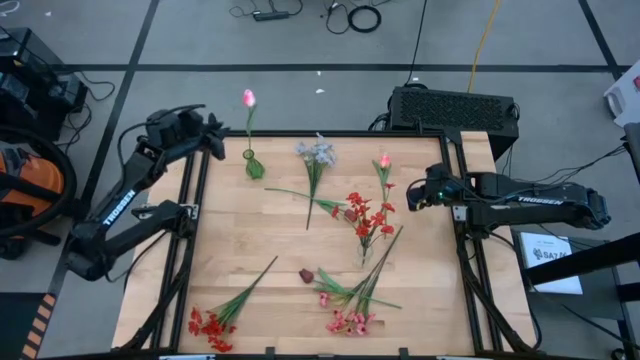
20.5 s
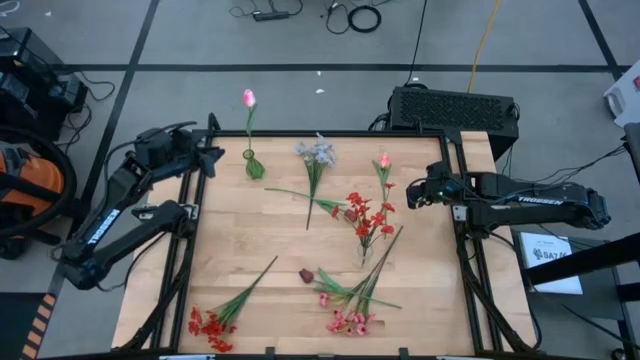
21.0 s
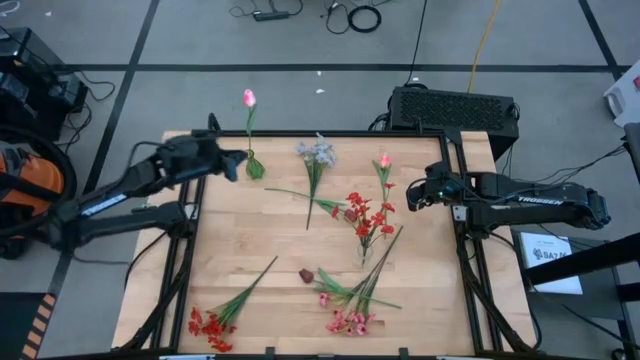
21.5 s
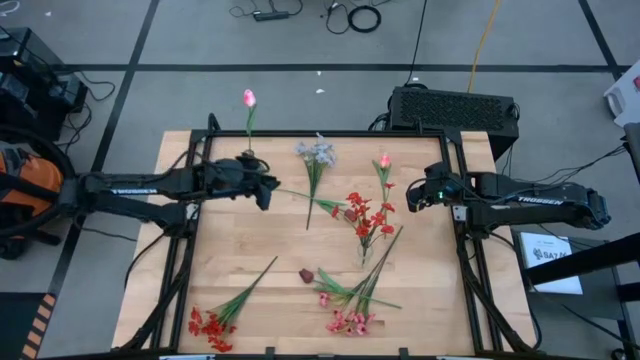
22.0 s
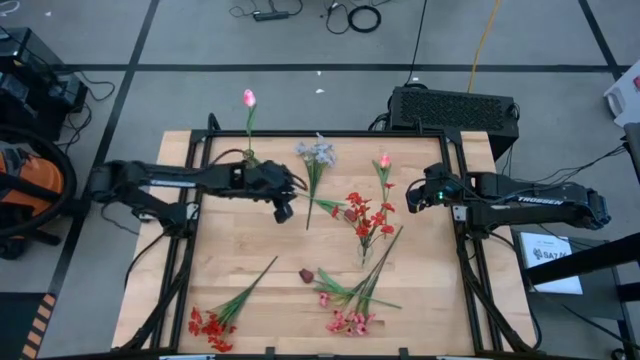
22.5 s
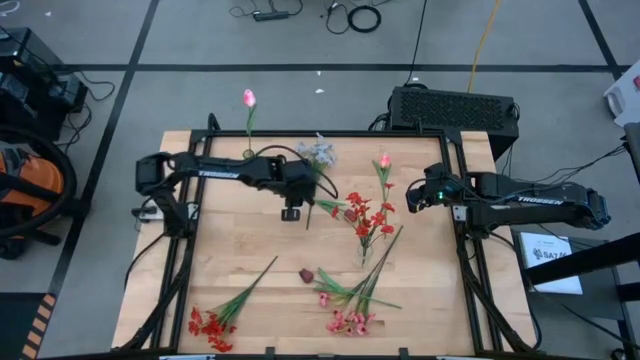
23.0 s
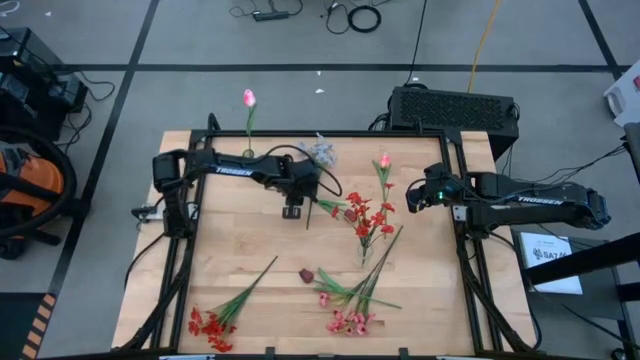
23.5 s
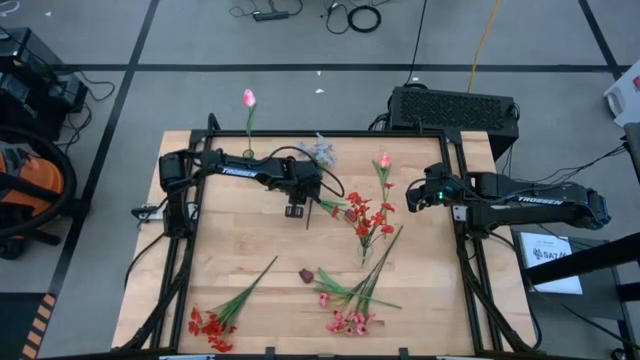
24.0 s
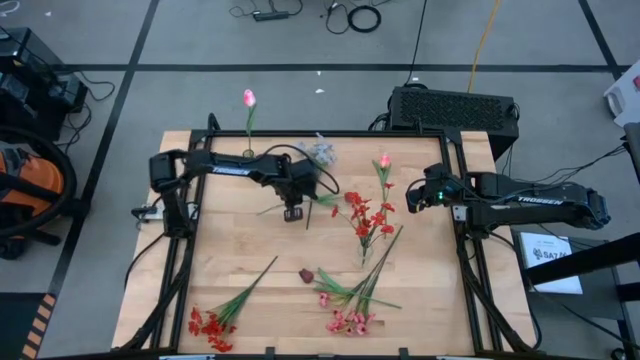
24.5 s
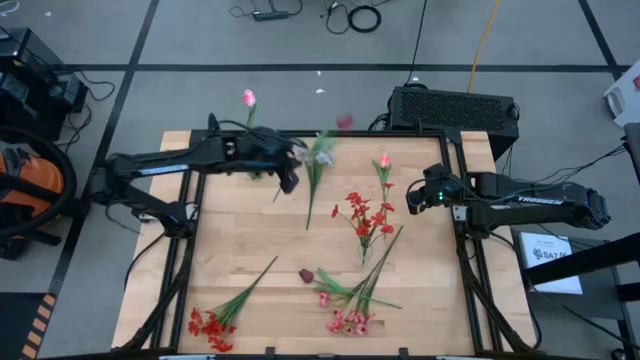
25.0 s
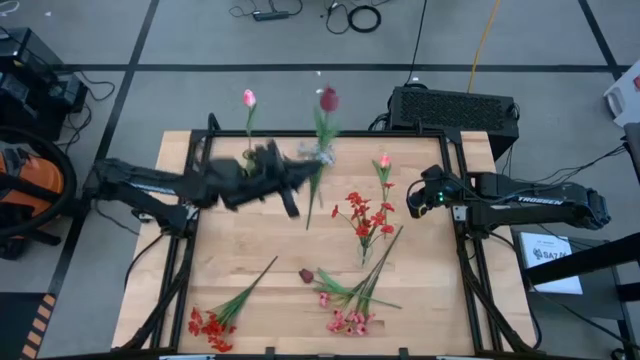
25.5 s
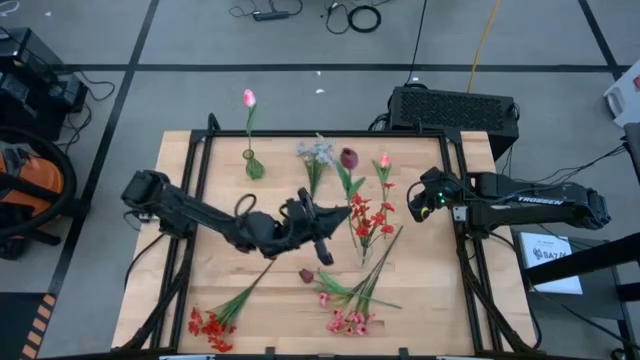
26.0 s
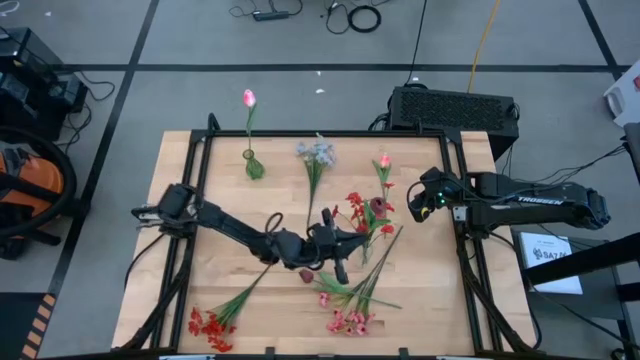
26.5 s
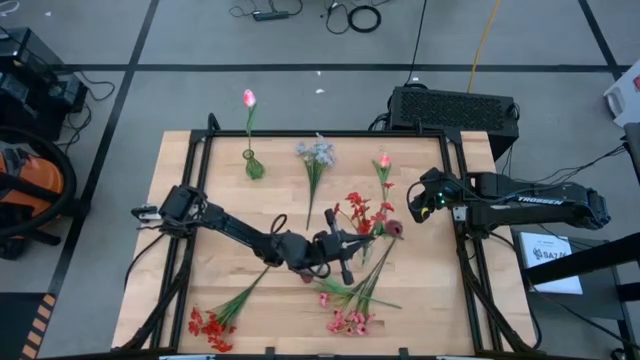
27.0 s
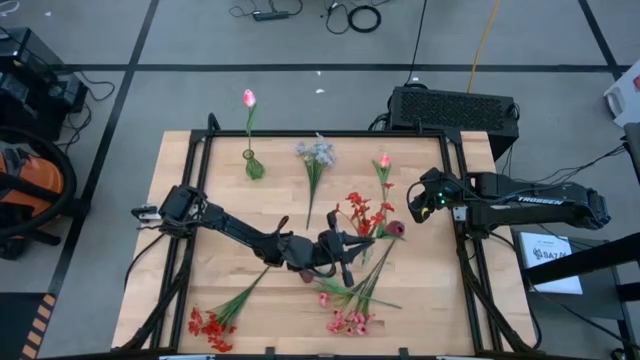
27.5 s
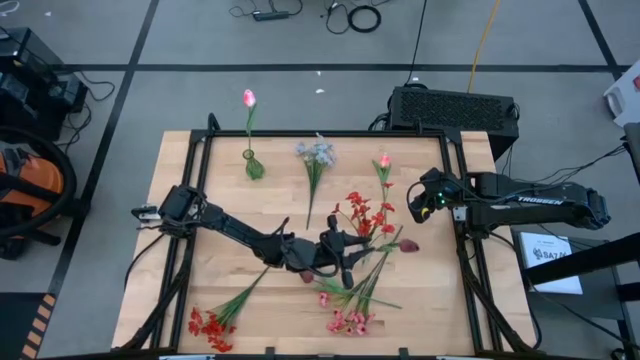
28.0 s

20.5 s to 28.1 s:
Task: Sort flowers into vase by color
Put the top red flower into the transparent vase

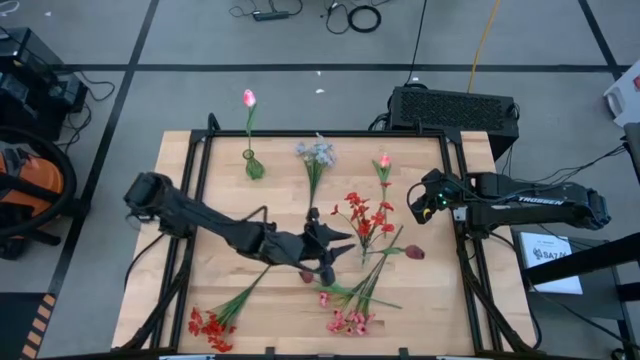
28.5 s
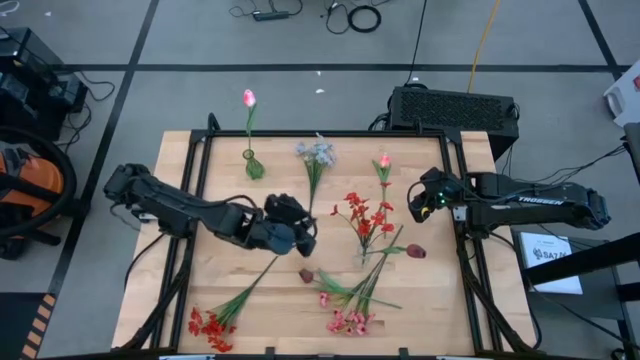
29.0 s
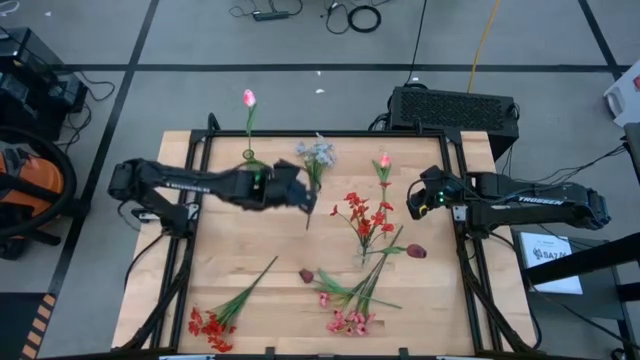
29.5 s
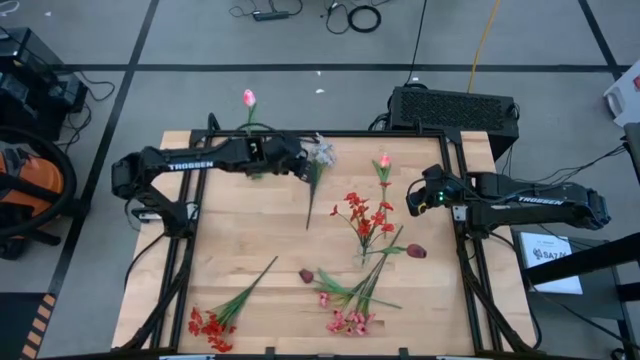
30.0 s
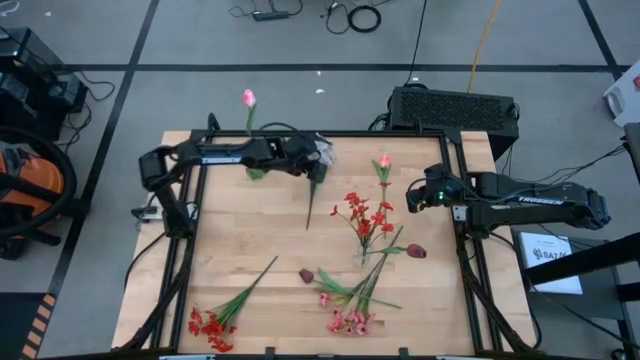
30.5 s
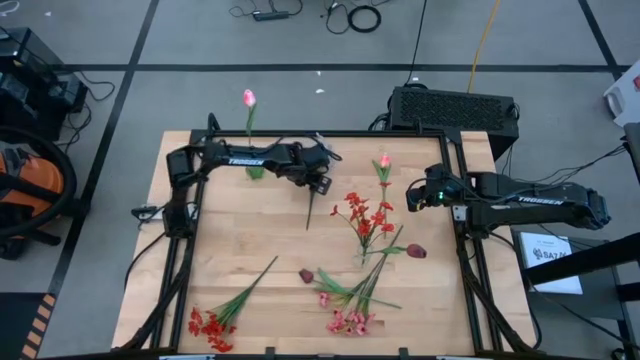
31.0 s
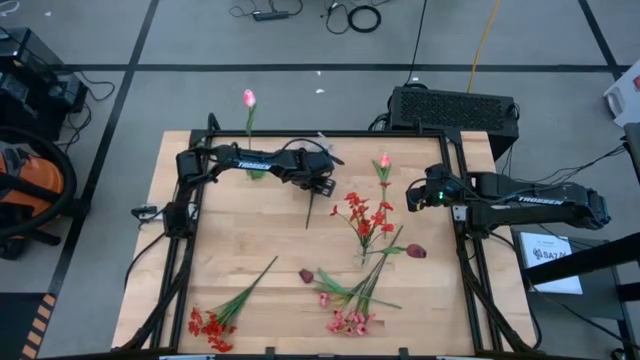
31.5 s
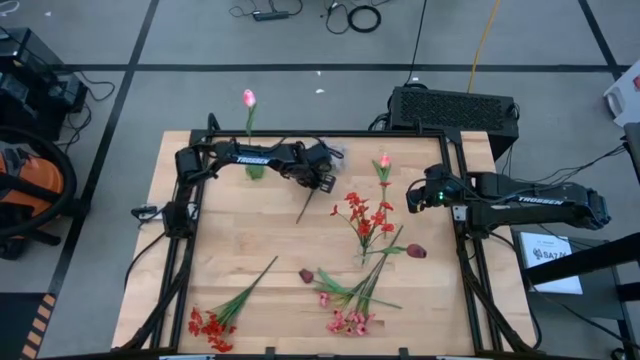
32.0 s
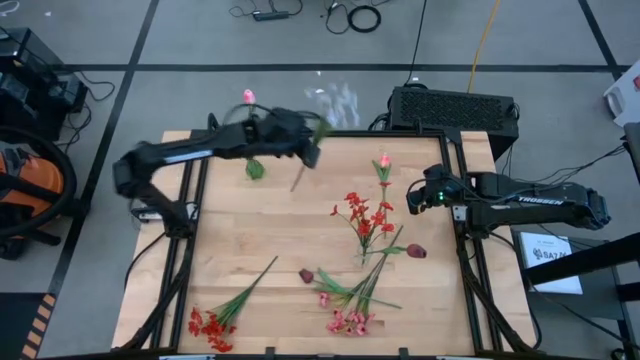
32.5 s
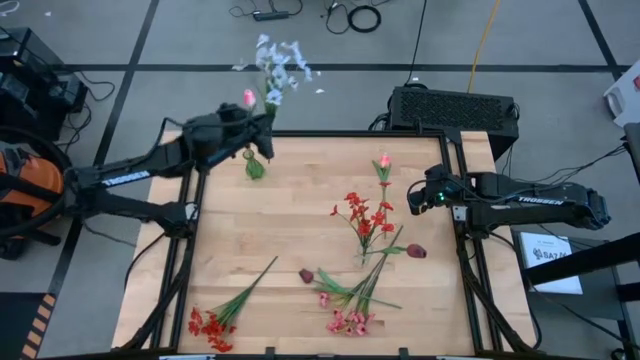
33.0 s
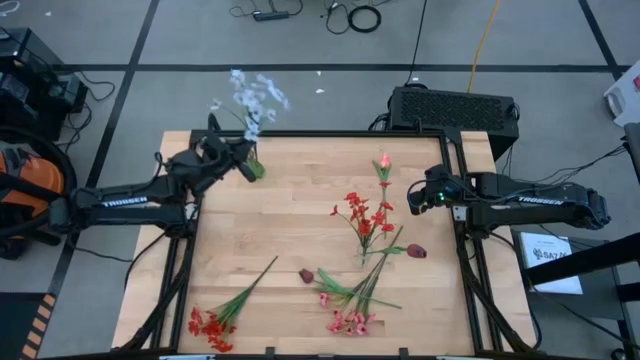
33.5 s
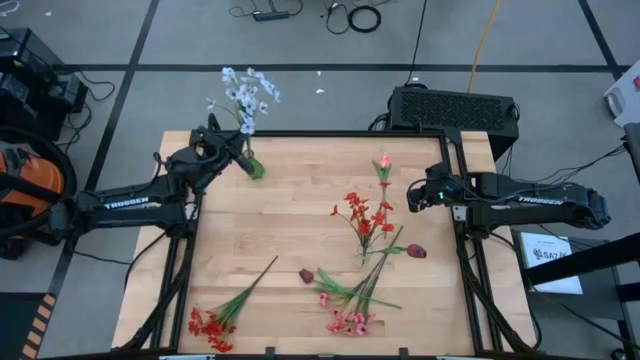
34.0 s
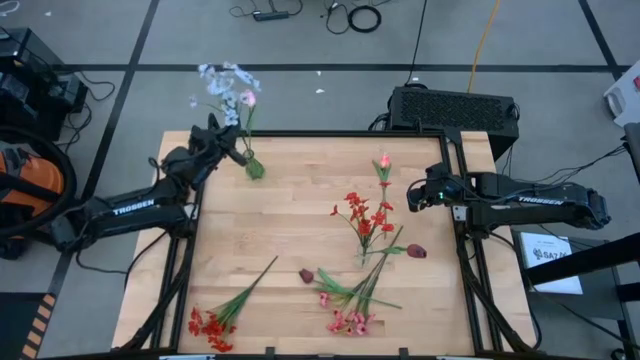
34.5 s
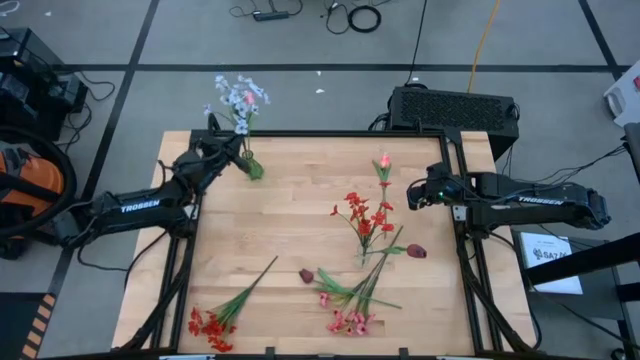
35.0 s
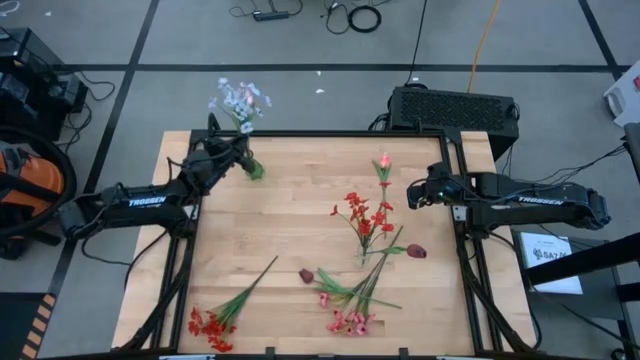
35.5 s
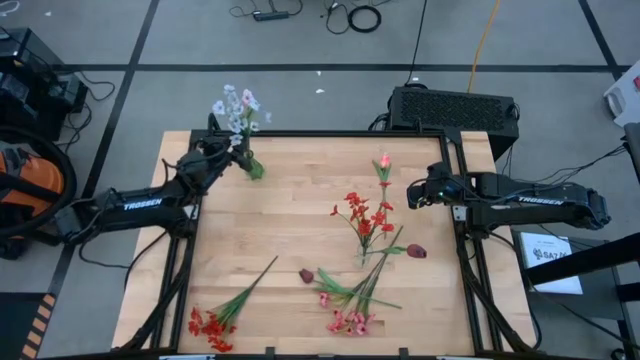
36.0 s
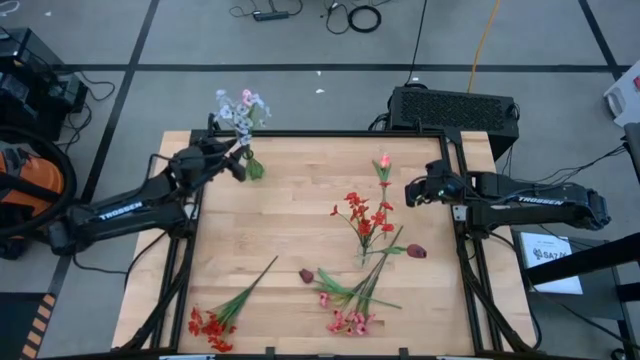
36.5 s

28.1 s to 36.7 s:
Put the white flower into the green vase

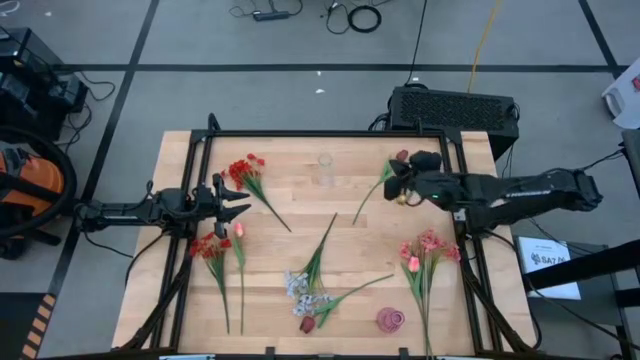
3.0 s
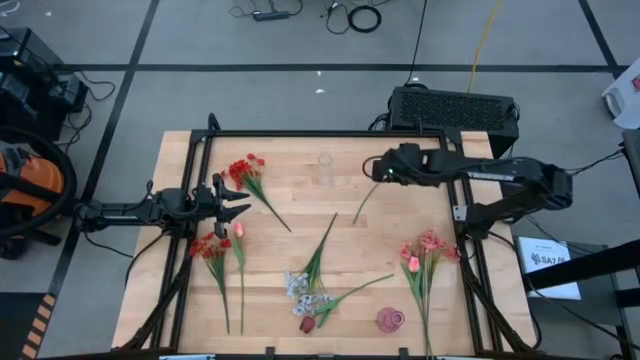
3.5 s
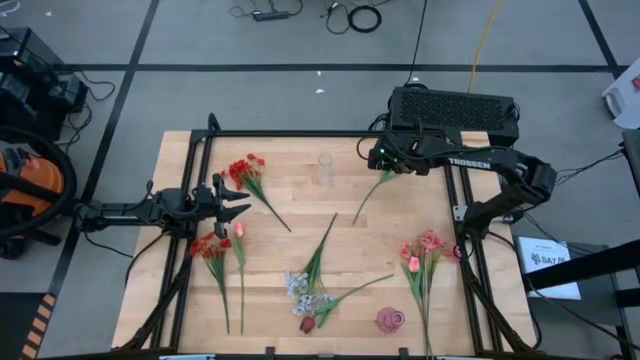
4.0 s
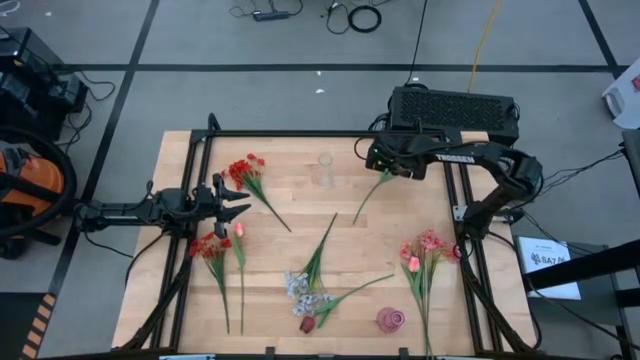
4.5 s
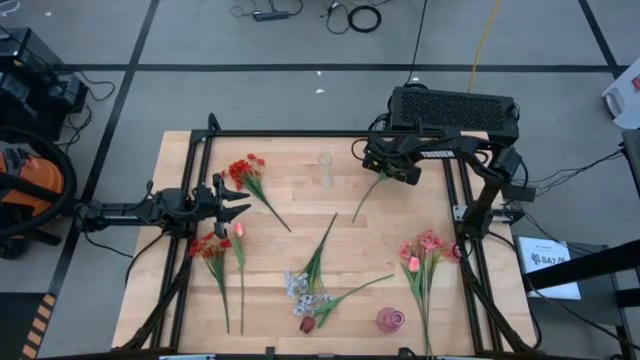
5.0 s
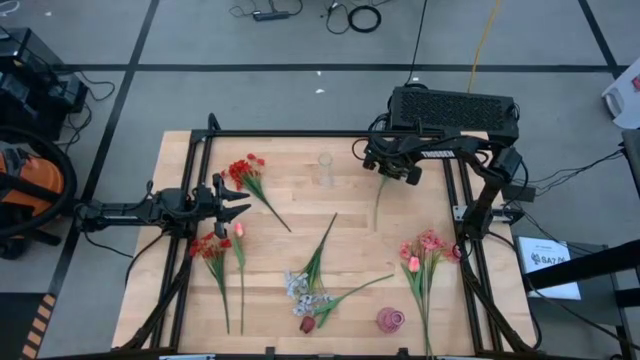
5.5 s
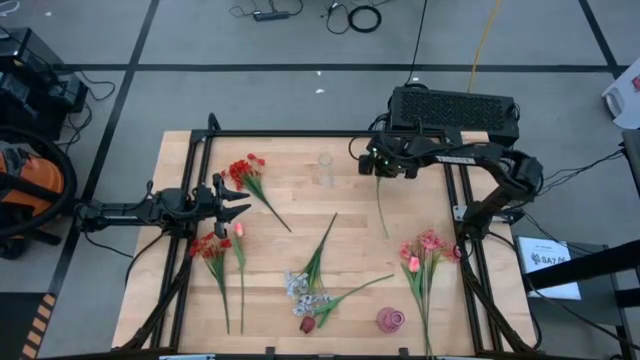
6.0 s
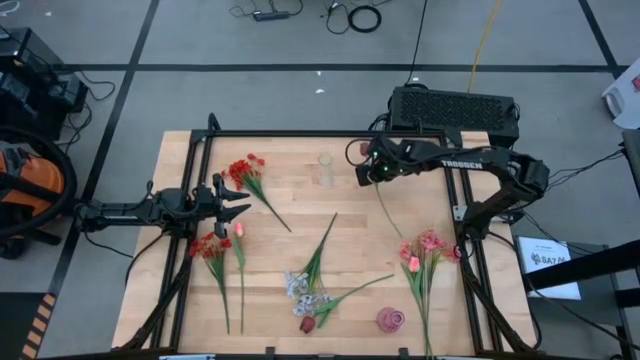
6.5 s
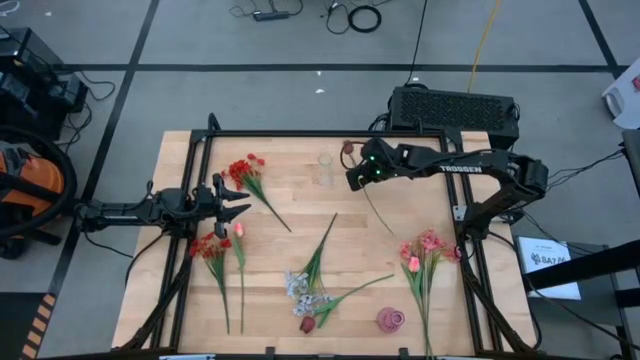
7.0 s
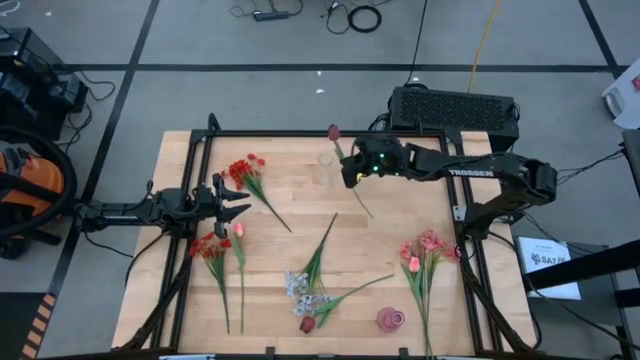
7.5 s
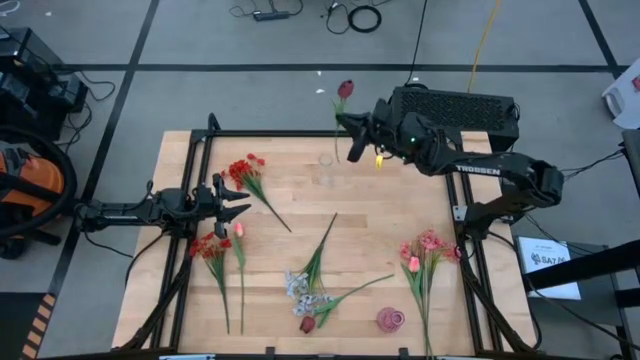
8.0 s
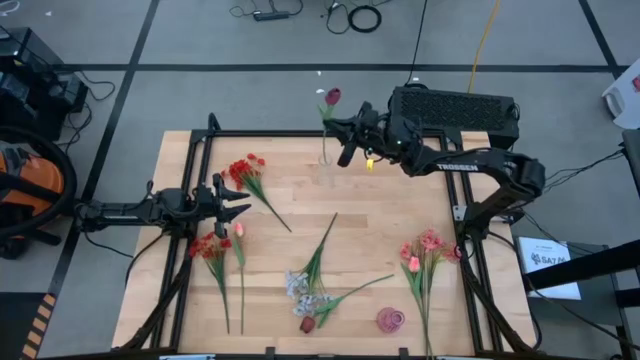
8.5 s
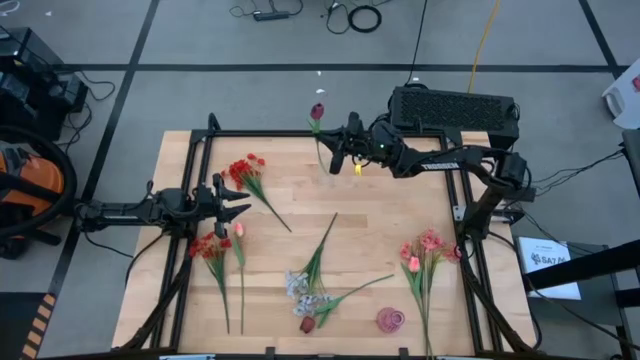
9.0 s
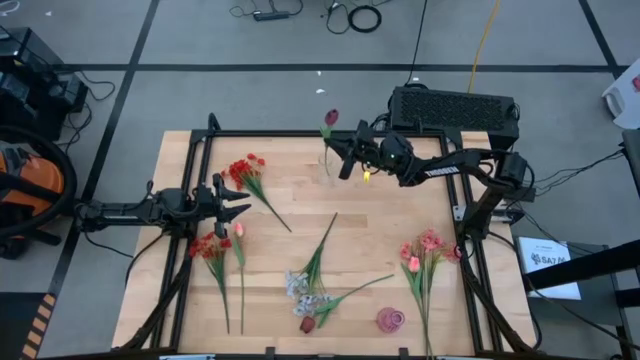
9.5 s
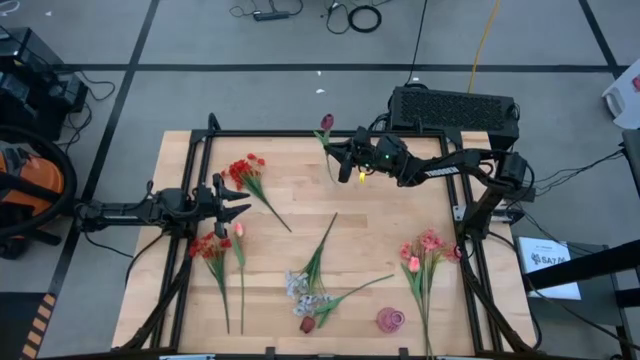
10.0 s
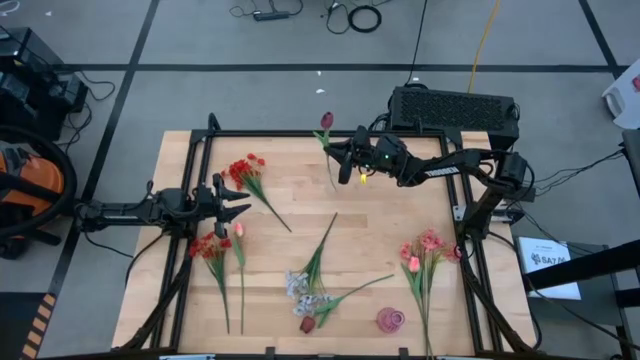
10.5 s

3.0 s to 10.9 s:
Task: Sort flowers into vase by color
Put the right dark red flower into the transparent vase
